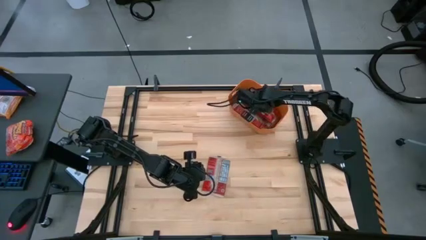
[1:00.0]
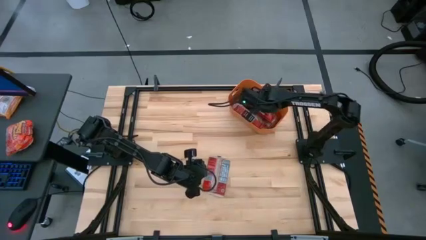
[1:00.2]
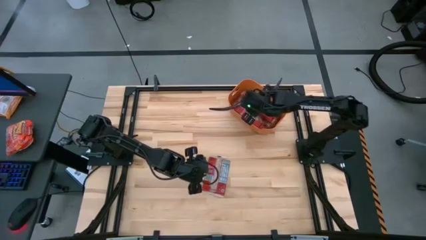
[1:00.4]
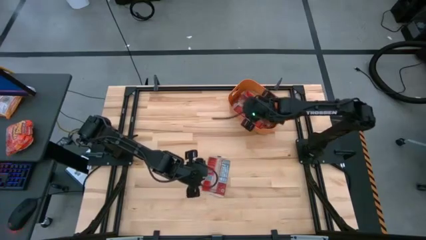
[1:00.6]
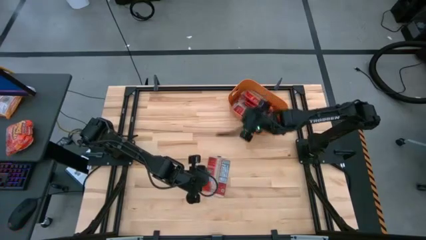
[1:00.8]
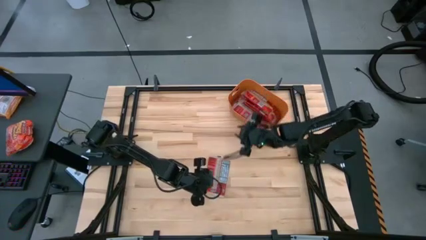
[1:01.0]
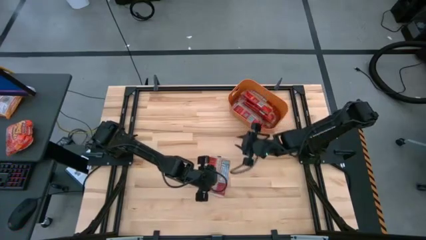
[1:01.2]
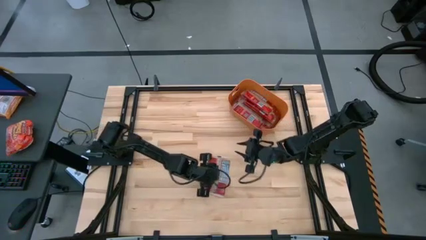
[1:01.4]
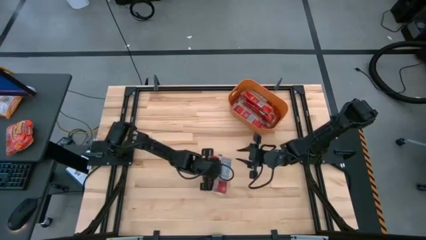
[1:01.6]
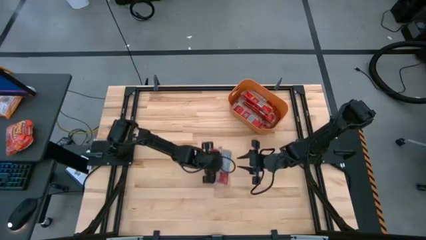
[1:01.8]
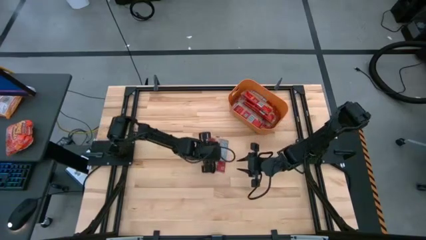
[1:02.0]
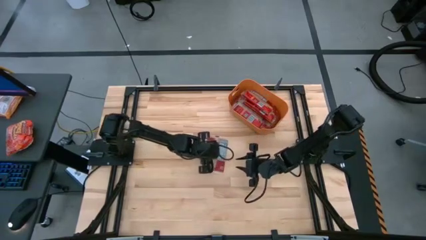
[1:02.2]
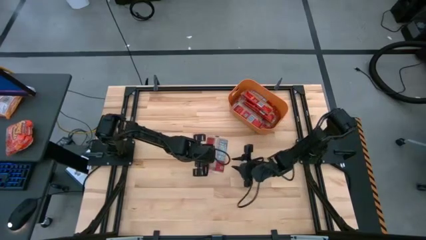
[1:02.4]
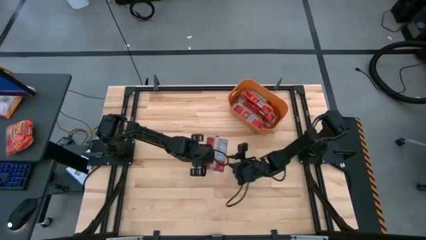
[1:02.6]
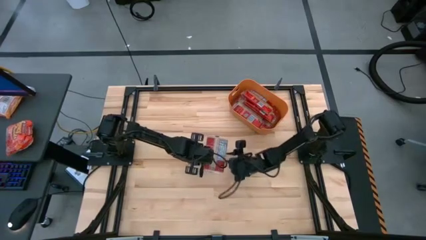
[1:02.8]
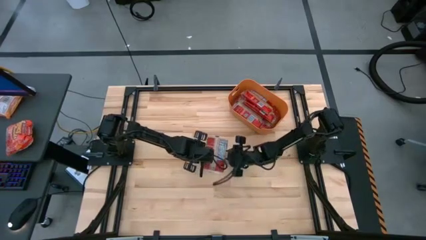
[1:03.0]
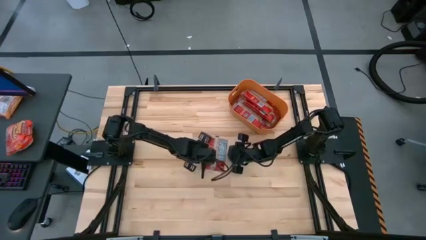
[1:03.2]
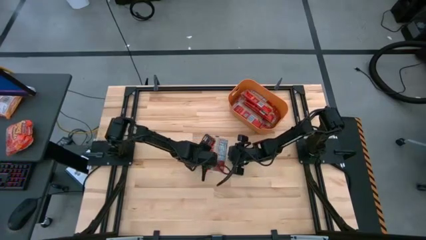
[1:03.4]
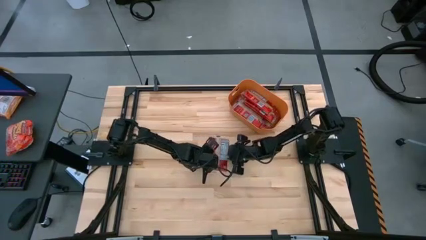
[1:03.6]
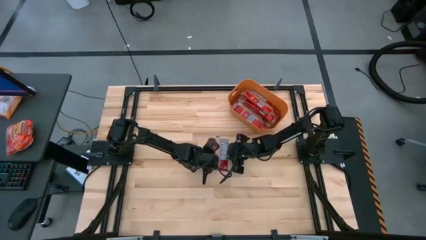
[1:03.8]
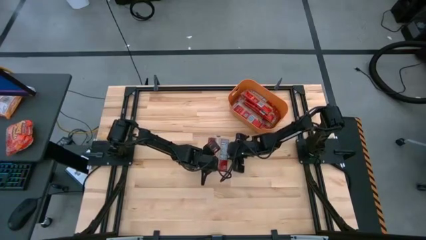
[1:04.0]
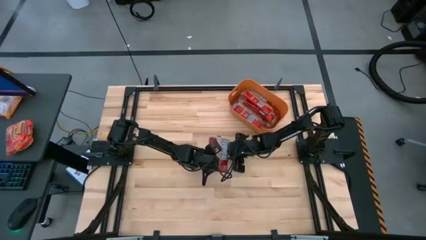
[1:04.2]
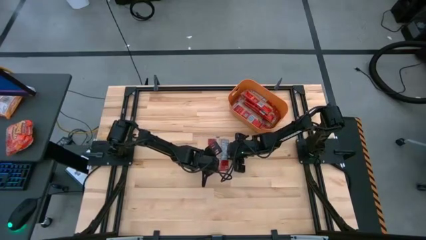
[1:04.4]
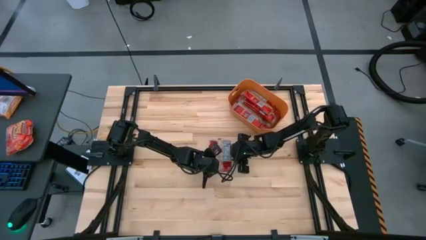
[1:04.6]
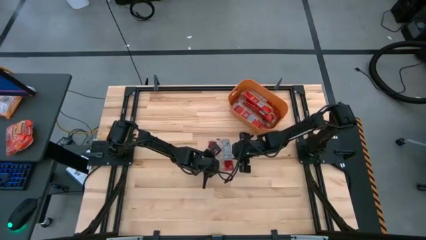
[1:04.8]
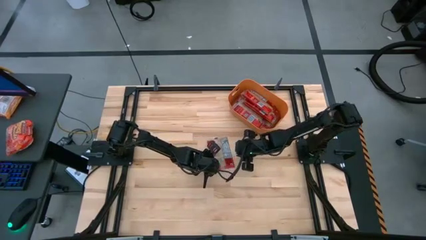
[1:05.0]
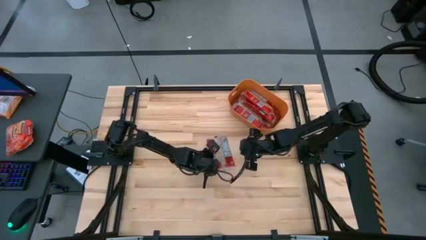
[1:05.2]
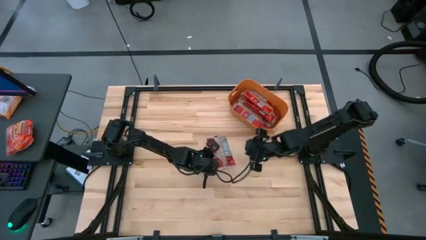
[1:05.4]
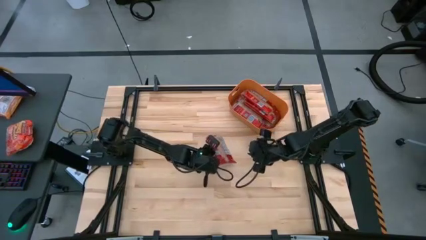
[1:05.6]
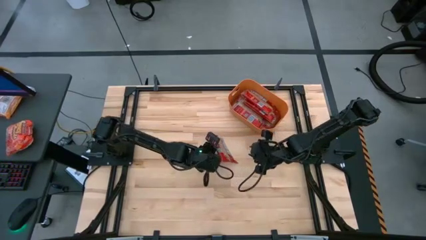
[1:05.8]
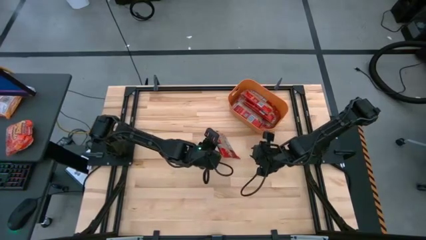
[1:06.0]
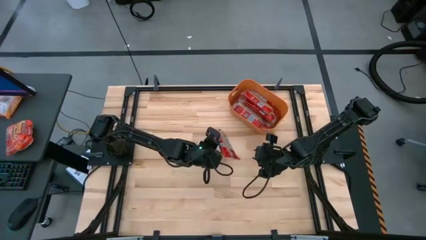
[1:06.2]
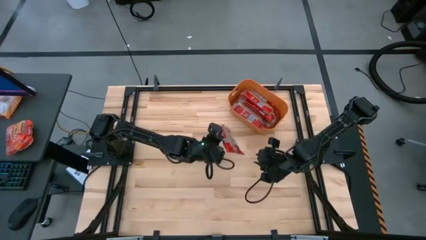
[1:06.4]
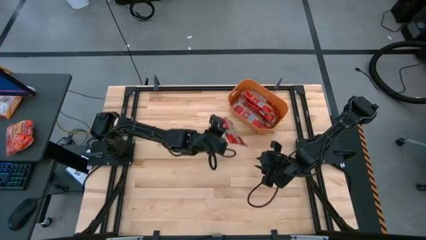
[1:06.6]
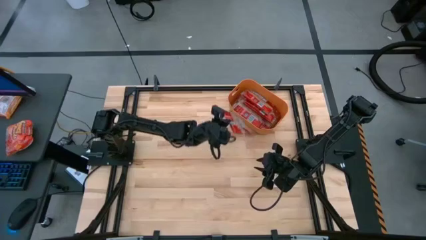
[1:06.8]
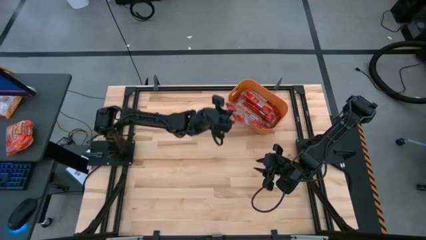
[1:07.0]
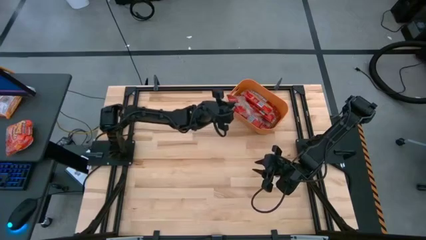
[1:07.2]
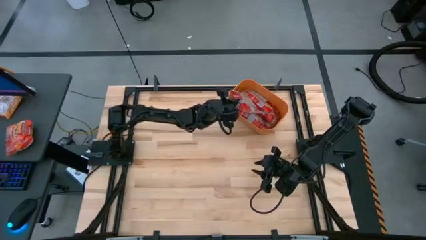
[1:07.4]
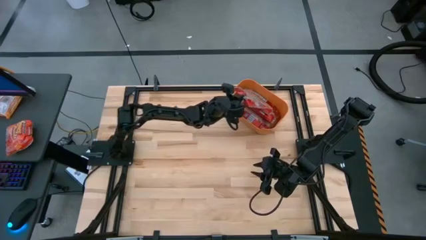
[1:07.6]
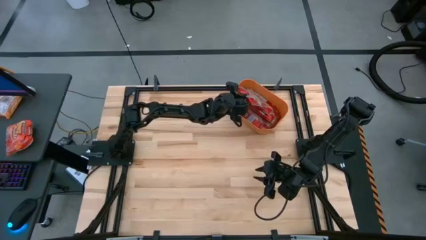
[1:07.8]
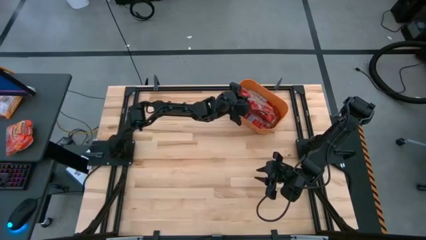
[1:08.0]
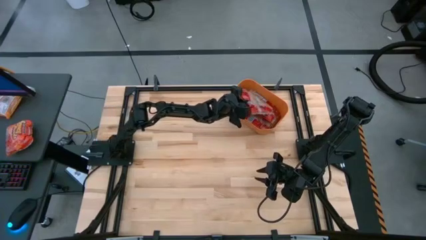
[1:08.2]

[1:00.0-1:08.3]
Task: Sort popcorn bags into baskets
Put the red popcorn bag into the orange bin

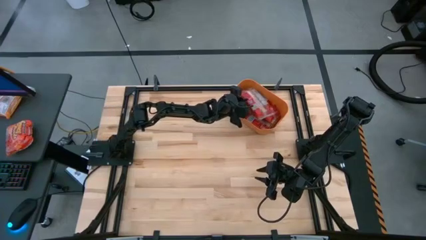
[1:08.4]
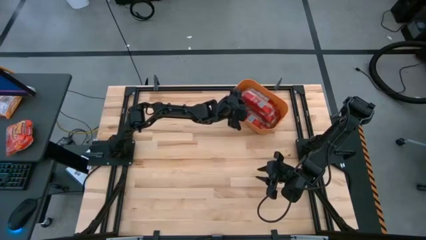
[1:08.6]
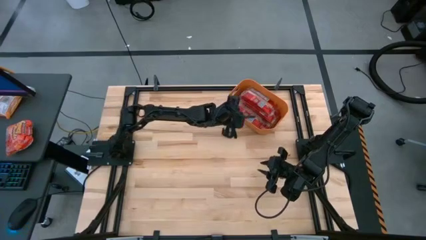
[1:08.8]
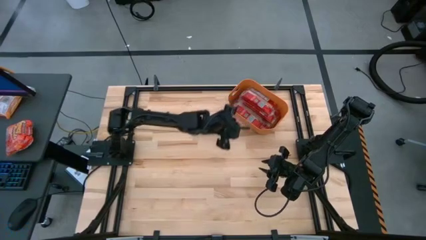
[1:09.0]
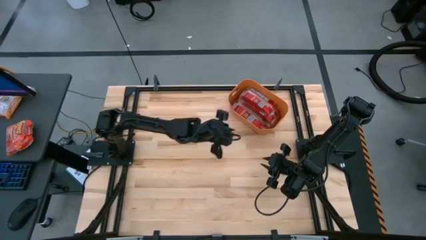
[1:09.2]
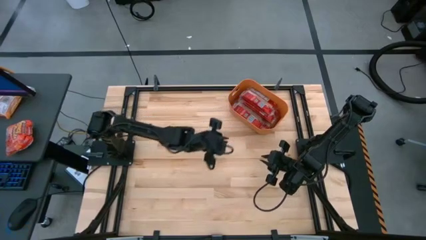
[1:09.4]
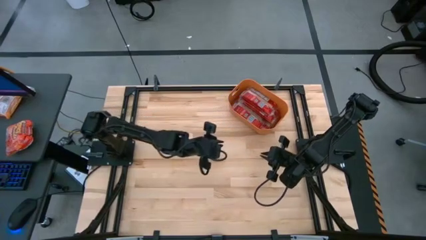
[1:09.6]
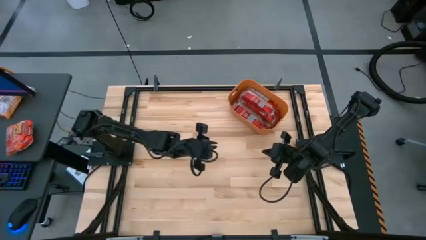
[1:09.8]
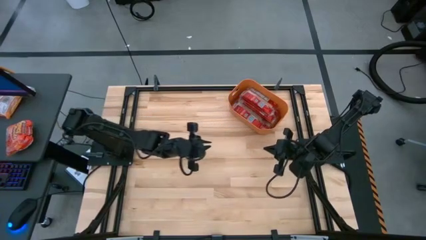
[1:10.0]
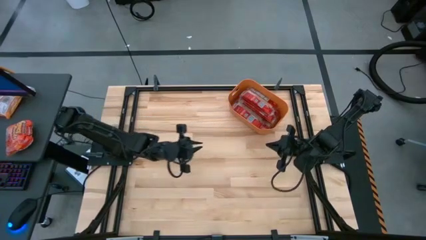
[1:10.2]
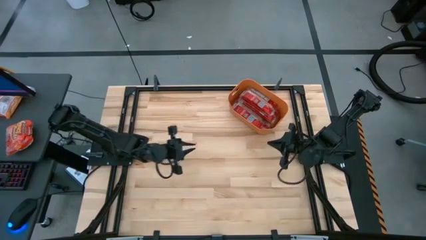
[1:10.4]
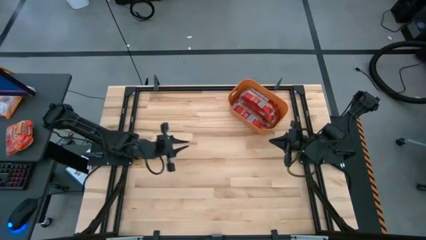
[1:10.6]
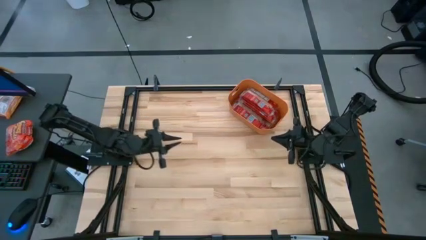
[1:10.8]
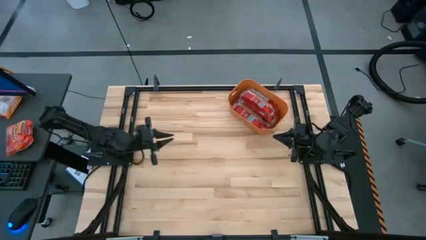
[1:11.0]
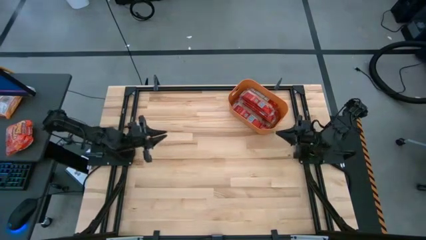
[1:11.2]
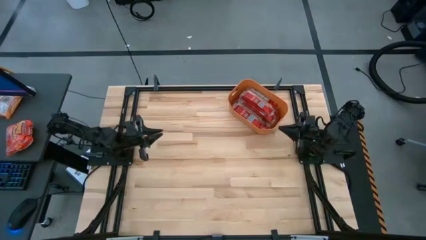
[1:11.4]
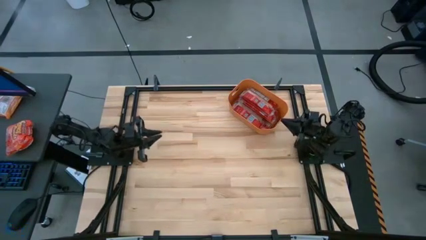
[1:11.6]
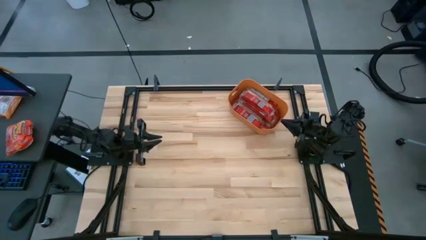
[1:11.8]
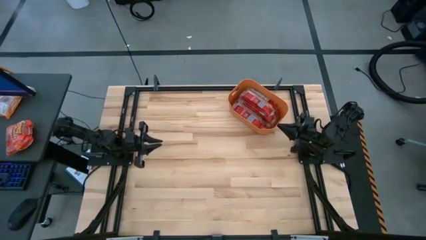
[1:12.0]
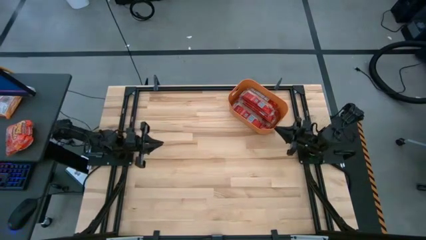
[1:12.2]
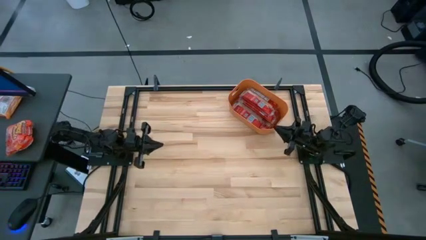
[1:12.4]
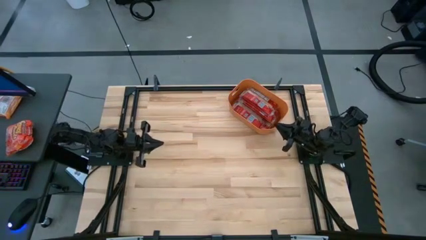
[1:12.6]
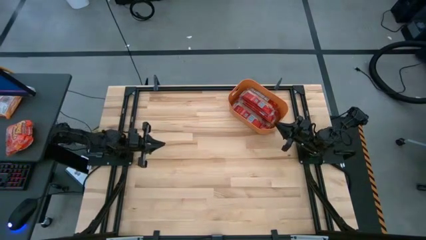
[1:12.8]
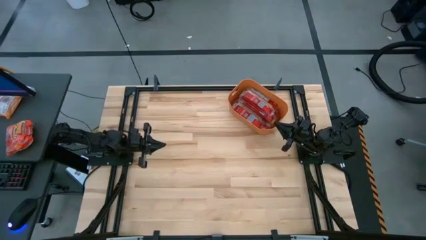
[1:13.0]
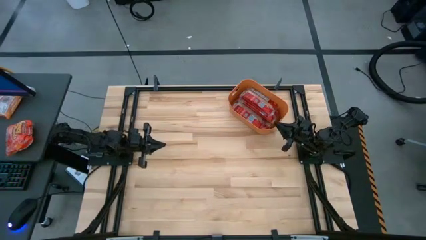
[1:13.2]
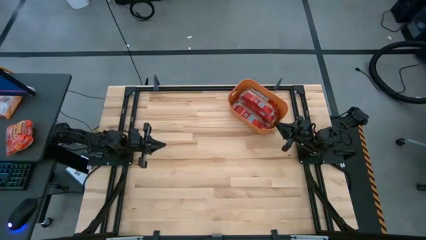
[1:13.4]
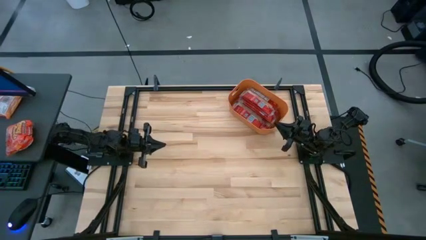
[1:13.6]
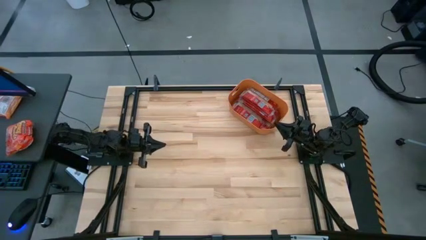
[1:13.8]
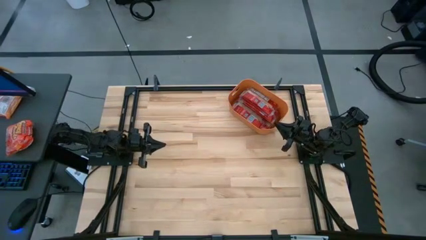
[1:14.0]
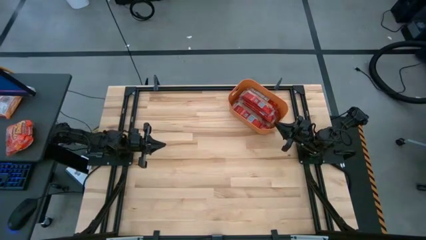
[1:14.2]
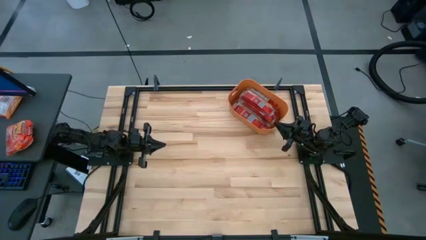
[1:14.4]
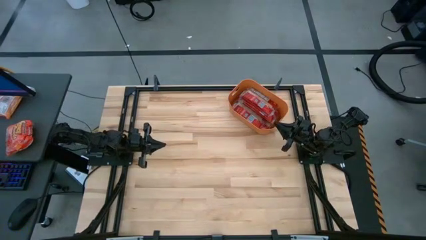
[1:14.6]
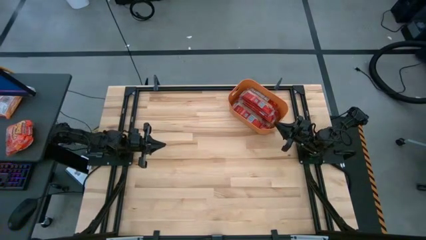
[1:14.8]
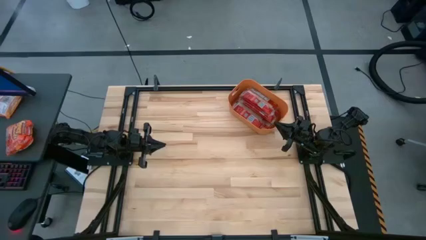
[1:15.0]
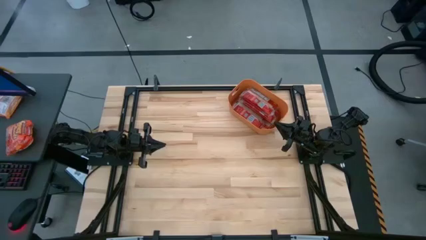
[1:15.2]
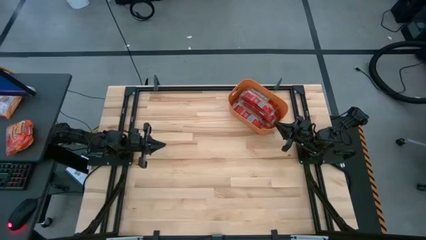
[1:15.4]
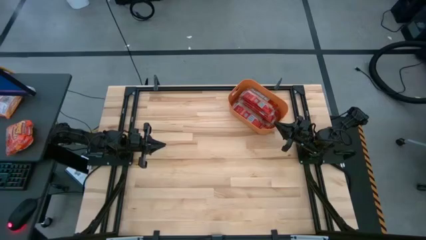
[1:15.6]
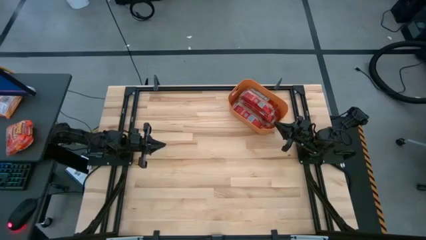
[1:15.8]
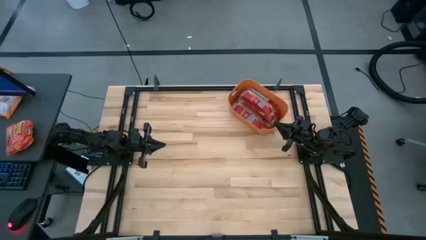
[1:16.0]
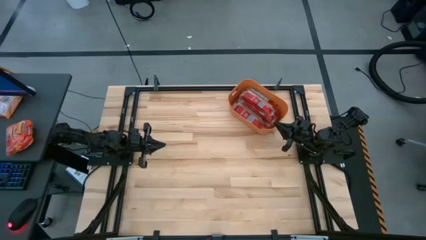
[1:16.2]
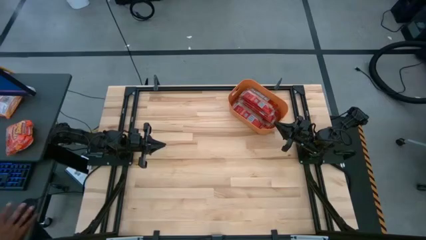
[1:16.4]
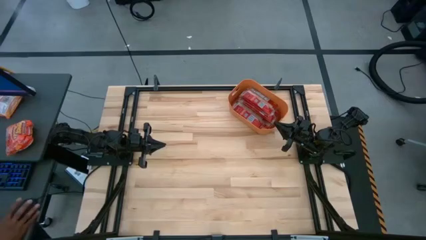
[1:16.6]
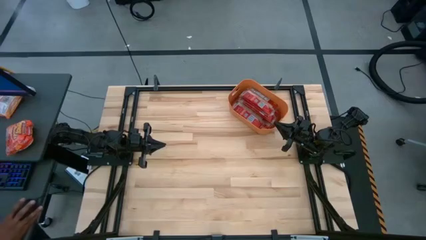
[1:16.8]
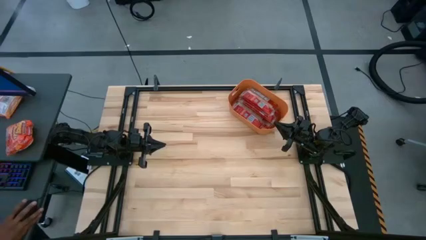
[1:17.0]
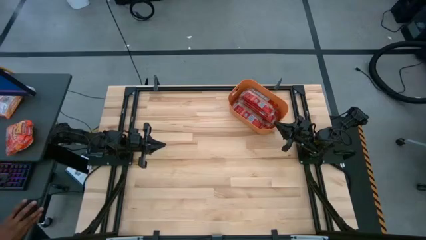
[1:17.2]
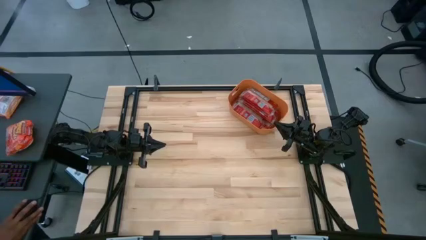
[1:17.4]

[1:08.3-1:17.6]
Return to Home Position
